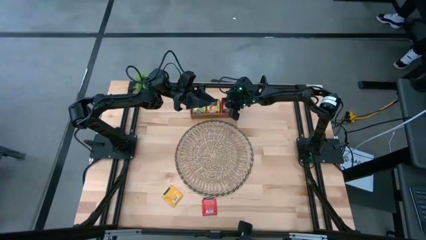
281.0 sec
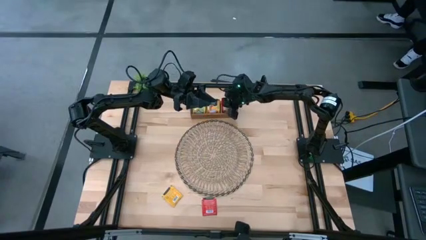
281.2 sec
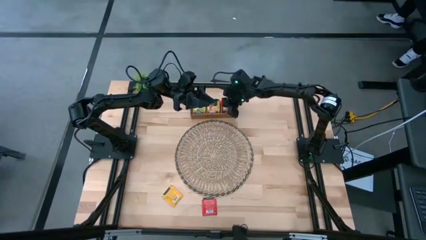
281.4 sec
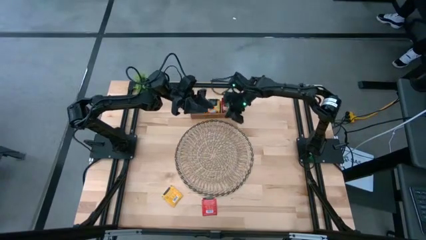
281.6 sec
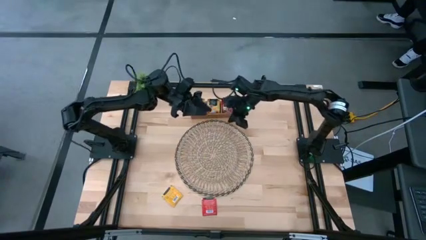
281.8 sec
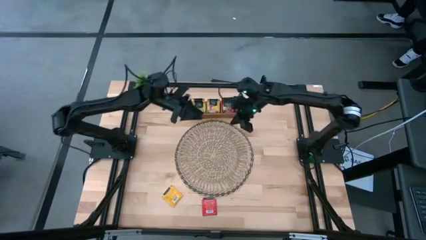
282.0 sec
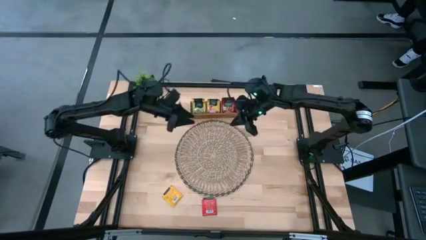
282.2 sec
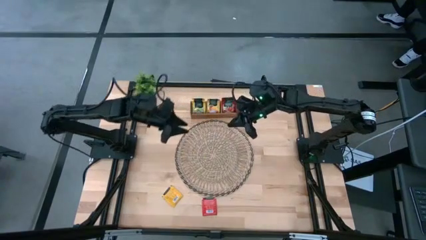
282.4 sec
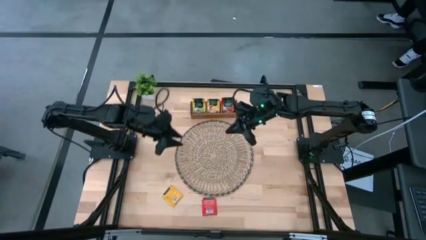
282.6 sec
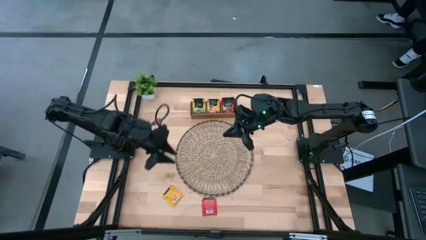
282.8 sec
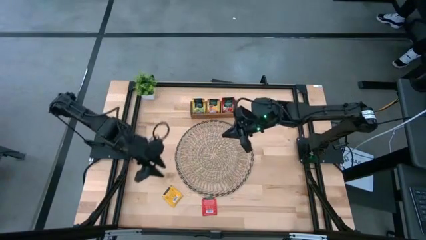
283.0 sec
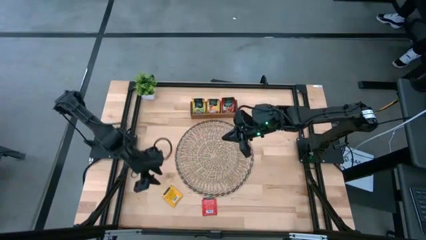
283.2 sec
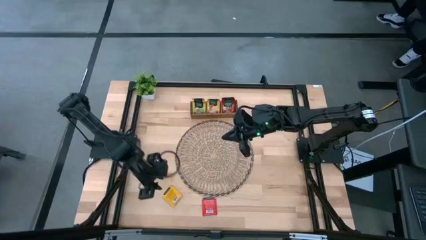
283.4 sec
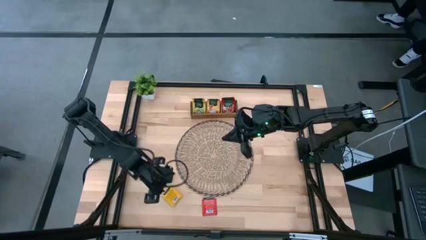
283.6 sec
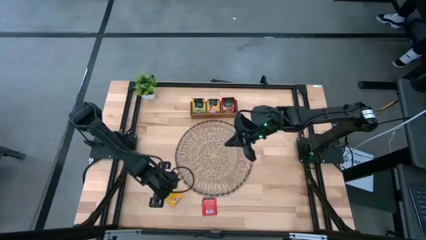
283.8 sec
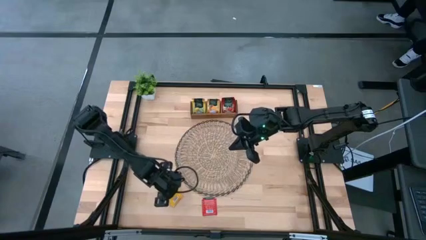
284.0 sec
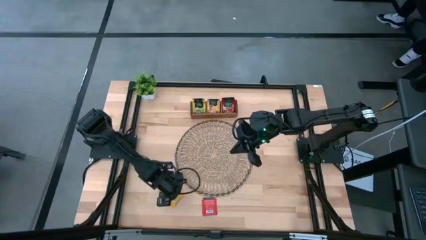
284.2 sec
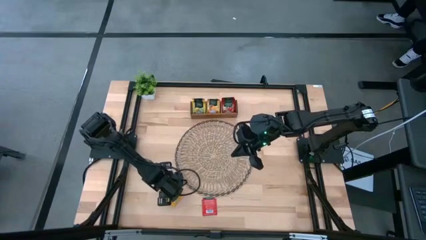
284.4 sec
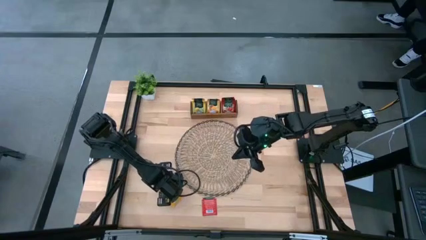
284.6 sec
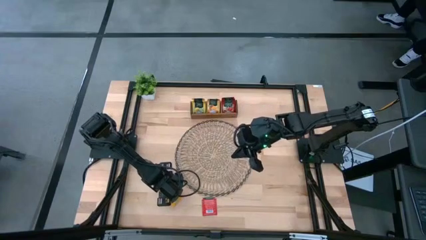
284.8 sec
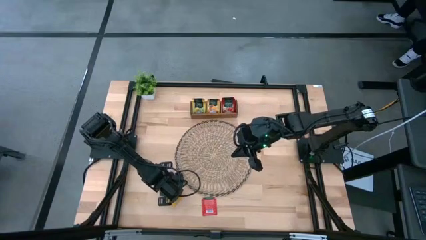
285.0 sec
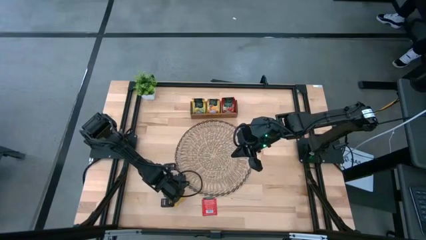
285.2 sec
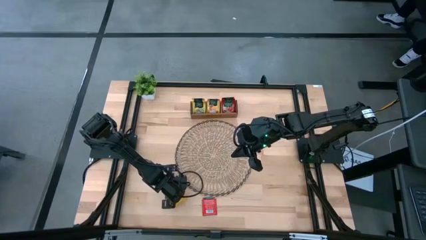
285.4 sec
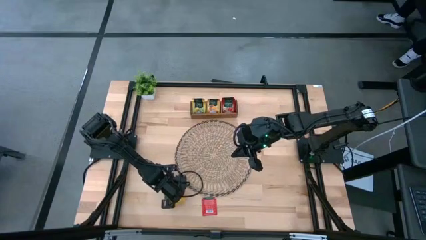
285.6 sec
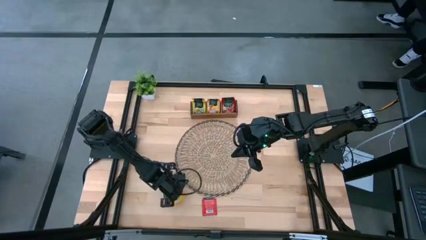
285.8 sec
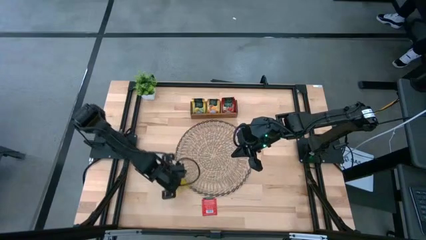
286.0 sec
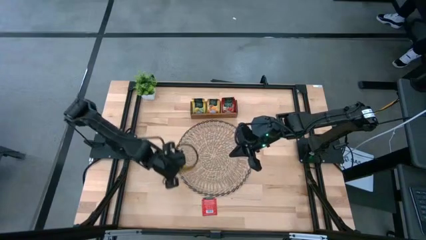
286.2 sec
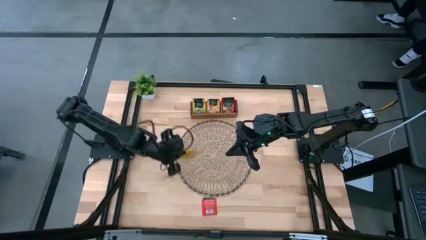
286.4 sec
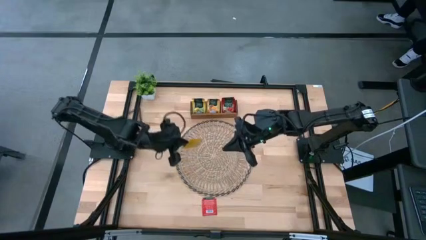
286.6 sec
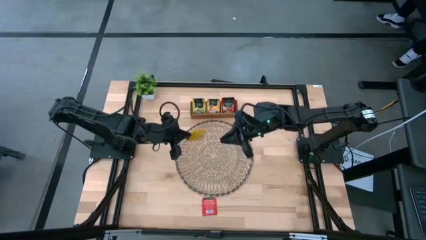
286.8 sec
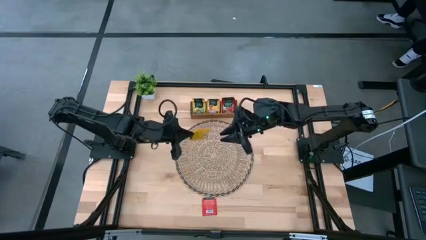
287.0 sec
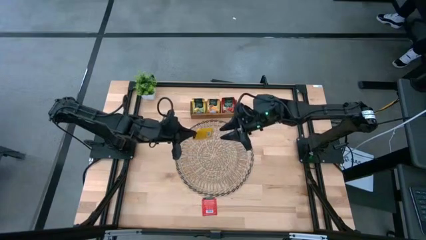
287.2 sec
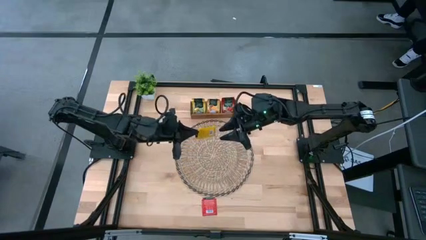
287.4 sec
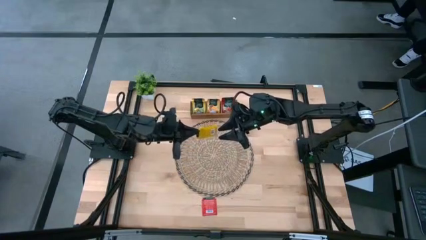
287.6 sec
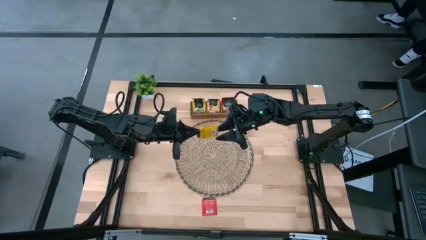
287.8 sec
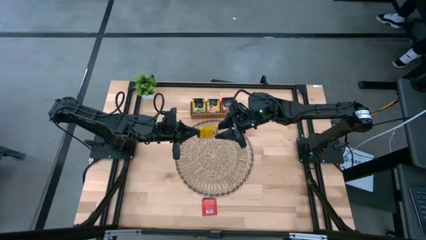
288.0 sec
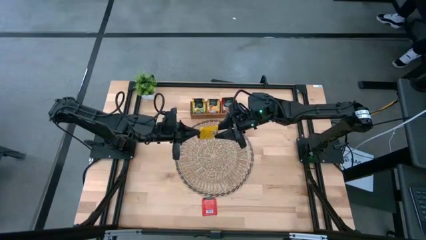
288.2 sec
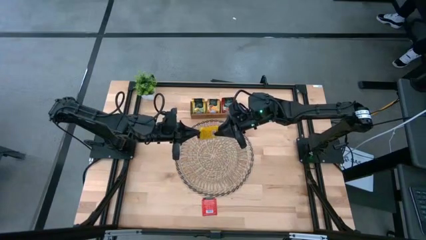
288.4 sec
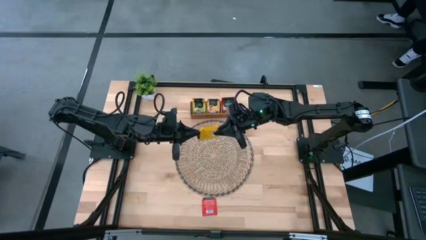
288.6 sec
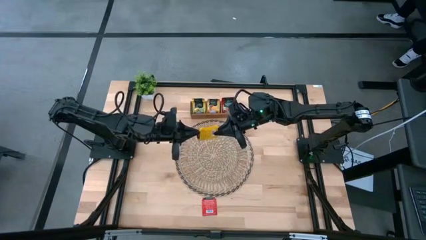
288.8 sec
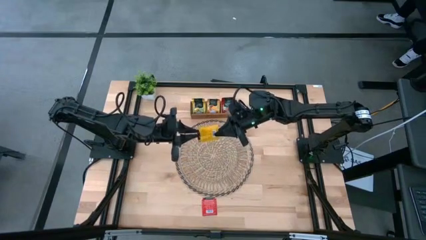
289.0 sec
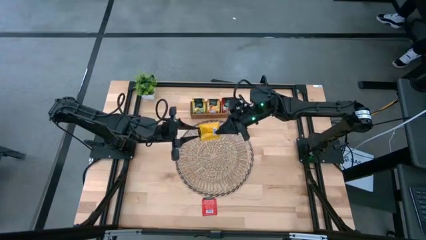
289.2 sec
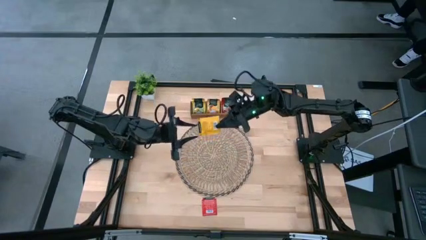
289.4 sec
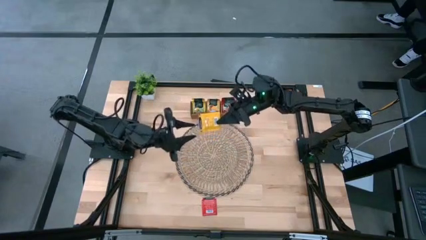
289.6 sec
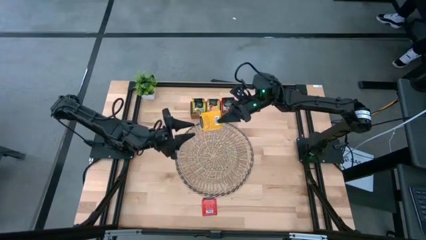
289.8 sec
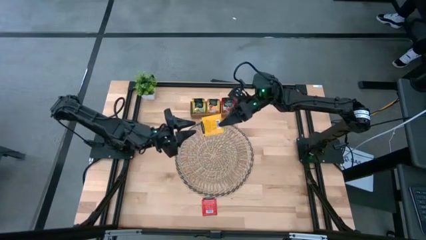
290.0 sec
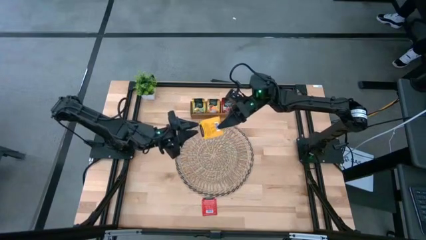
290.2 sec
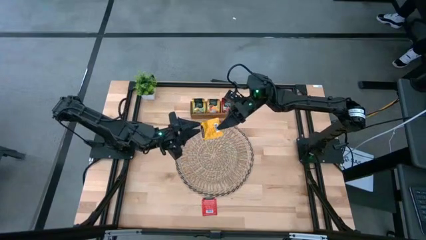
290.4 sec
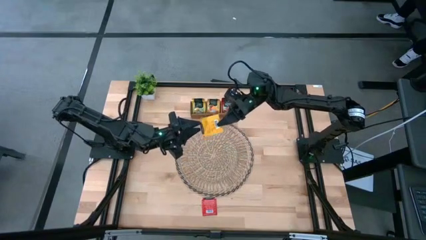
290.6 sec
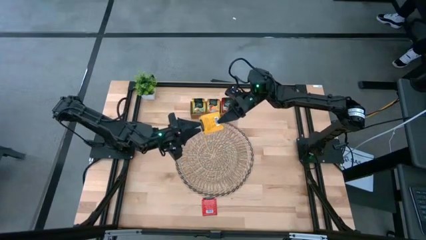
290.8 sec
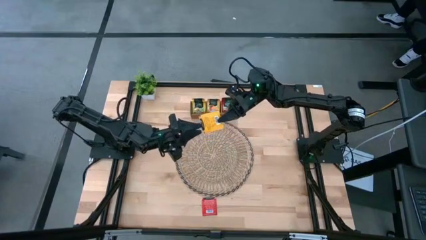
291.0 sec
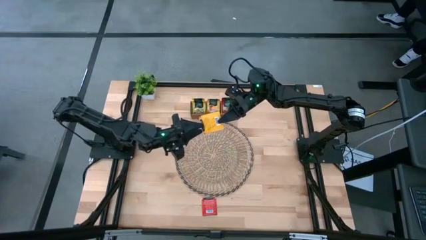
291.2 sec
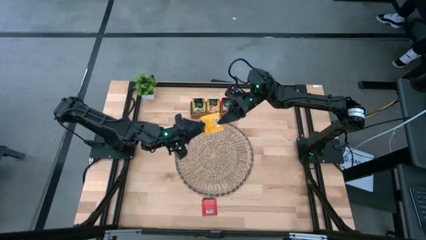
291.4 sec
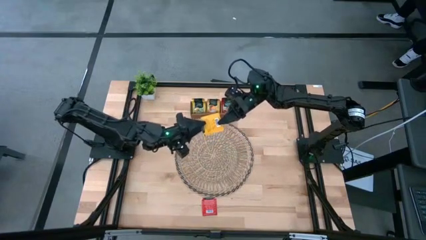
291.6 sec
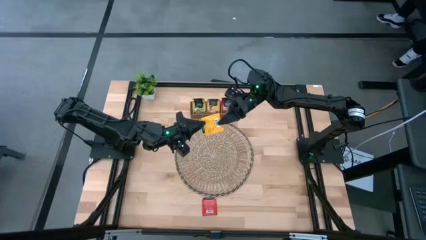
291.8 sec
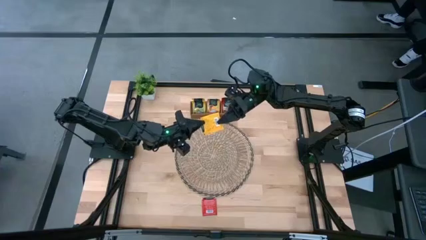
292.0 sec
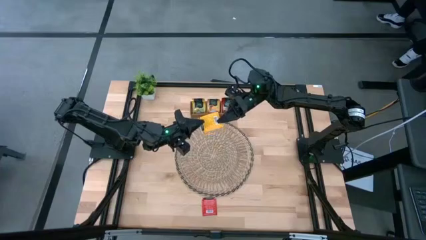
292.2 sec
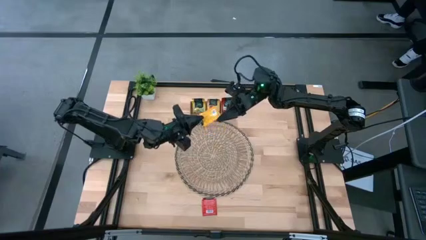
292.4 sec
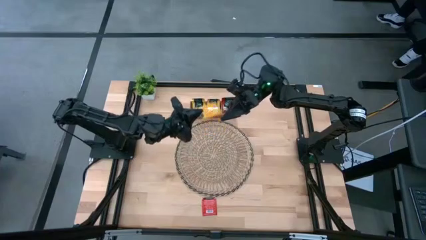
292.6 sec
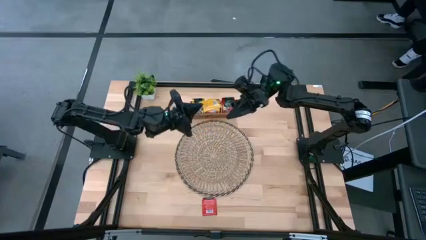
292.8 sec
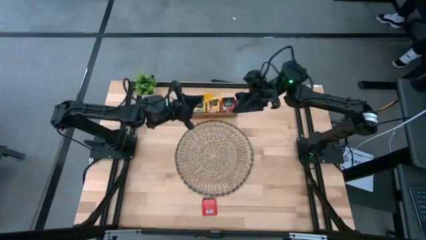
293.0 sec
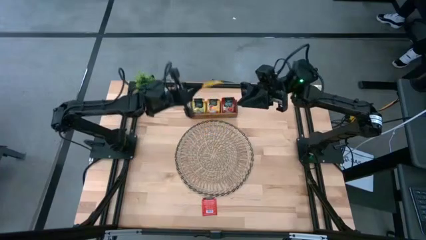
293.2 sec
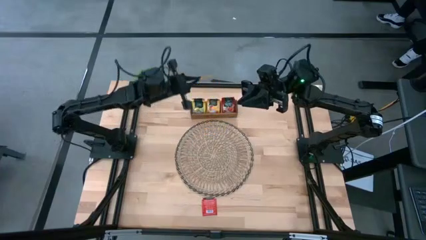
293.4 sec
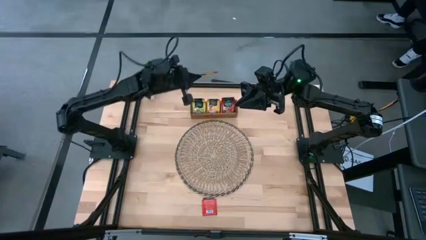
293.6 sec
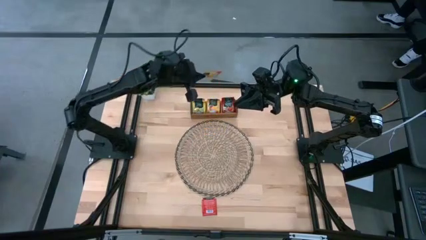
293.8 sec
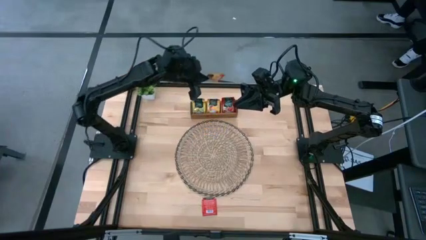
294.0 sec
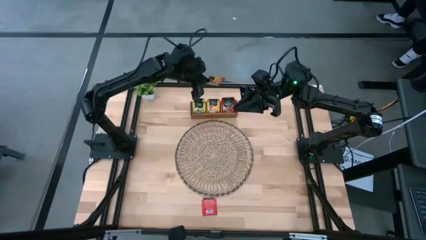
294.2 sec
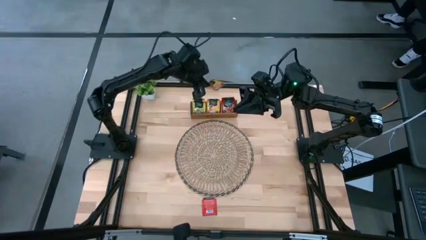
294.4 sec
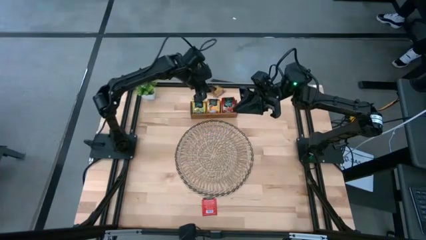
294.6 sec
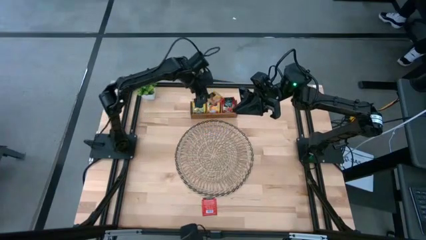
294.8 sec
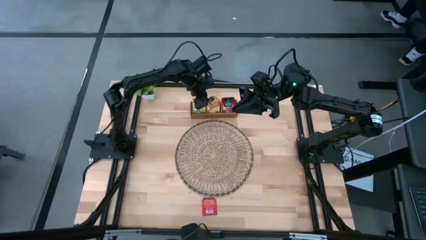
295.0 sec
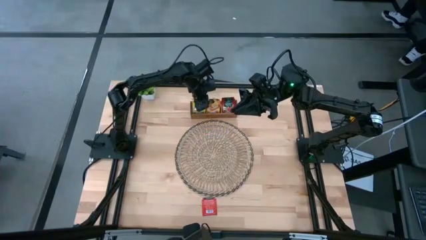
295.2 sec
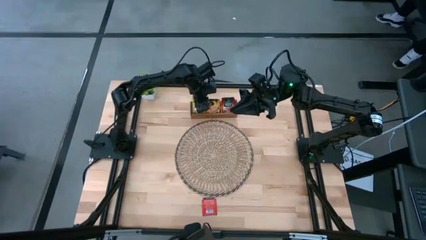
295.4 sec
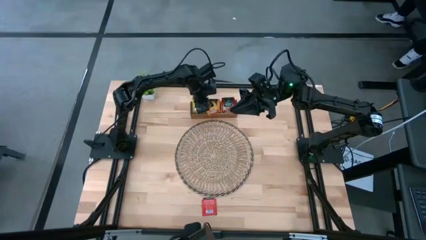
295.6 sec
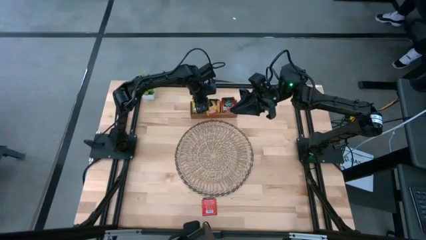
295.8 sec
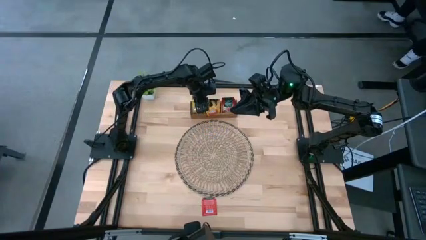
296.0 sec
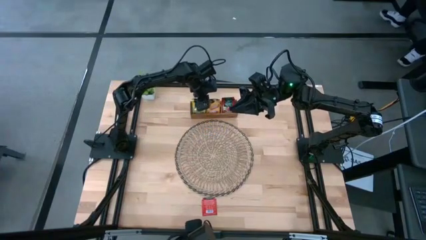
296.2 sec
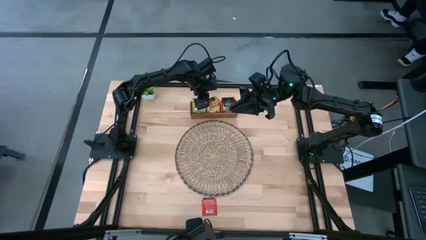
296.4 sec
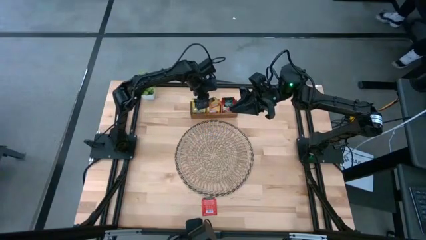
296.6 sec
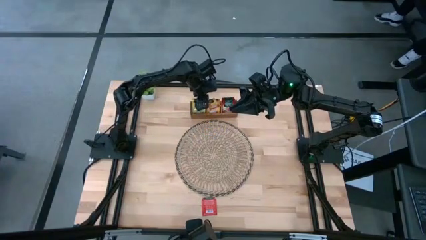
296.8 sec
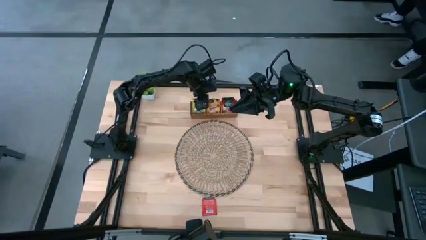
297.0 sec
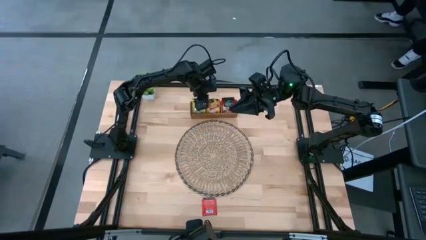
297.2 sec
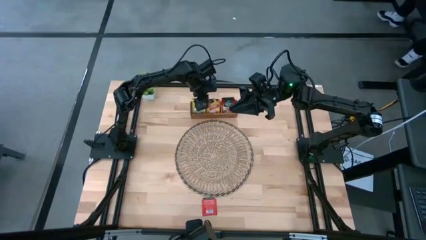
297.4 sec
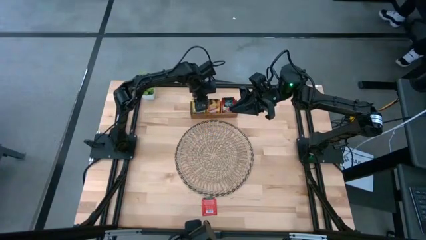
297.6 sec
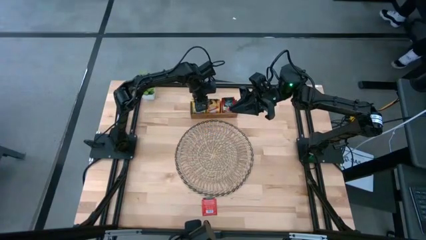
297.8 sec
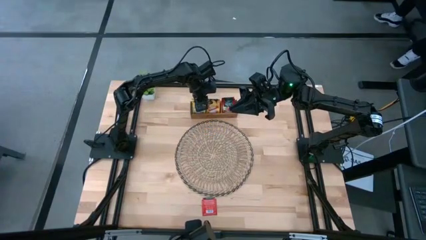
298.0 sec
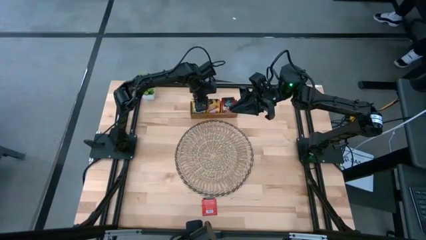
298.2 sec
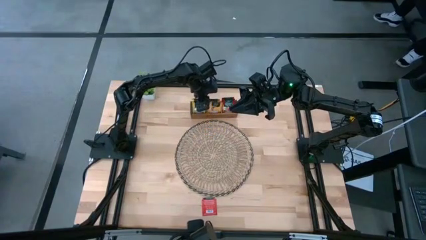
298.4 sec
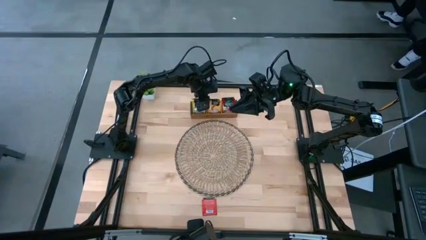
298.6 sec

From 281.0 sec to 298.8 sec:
Task: Pick & Place Tea
Put the orange tea bag into the middle of the wooden organizer
